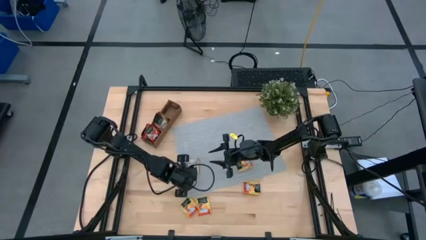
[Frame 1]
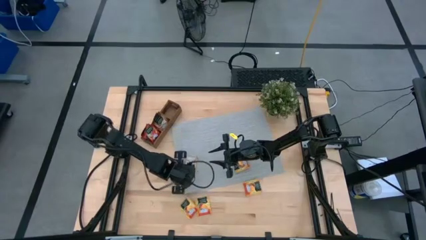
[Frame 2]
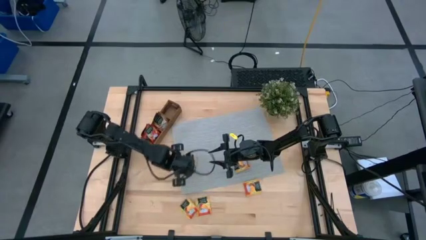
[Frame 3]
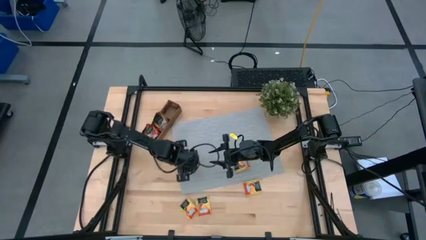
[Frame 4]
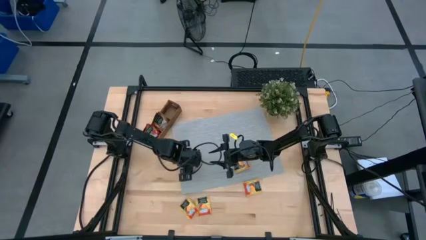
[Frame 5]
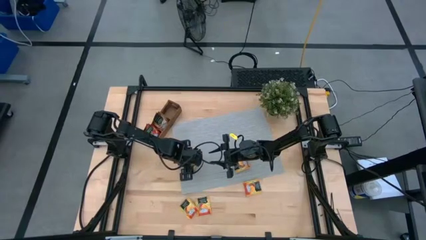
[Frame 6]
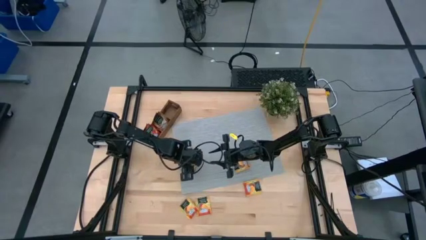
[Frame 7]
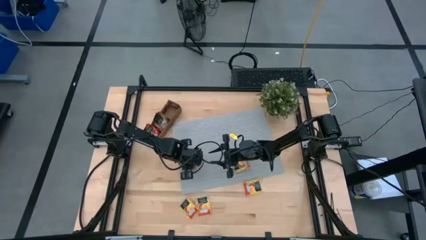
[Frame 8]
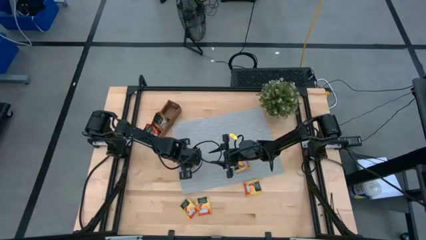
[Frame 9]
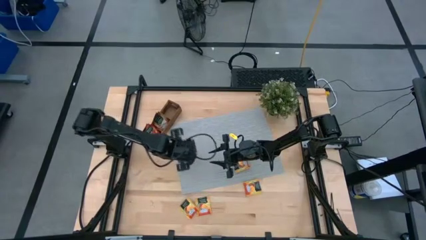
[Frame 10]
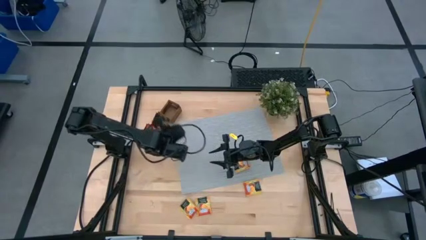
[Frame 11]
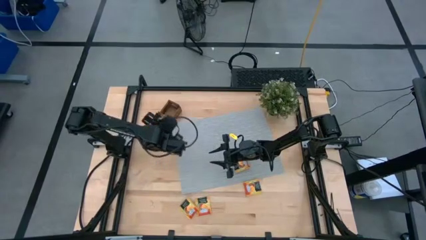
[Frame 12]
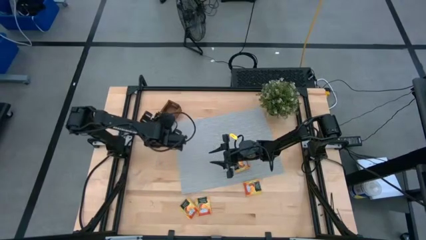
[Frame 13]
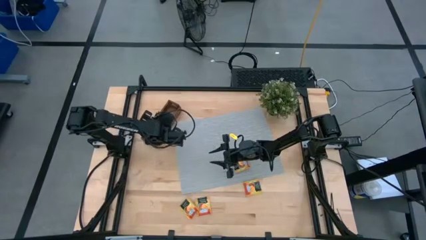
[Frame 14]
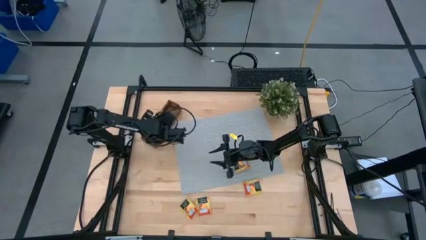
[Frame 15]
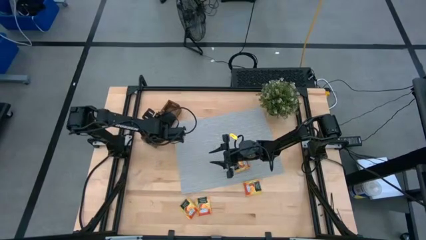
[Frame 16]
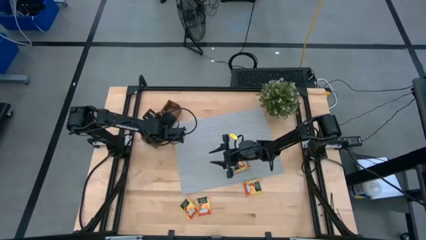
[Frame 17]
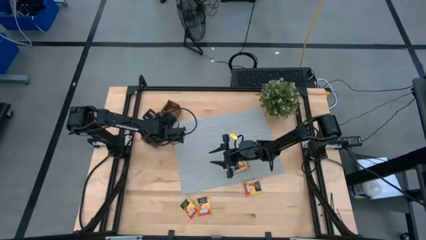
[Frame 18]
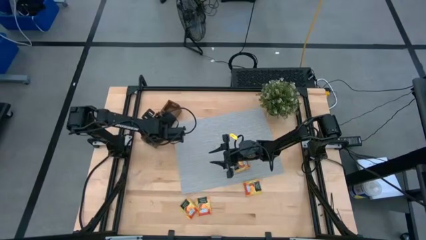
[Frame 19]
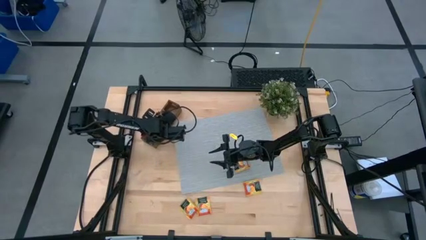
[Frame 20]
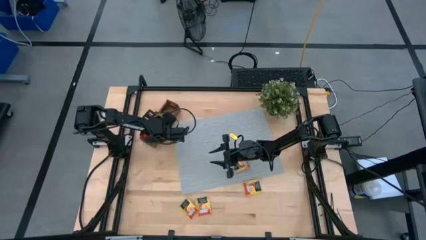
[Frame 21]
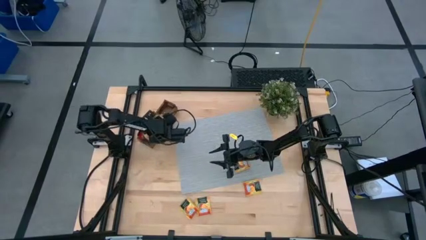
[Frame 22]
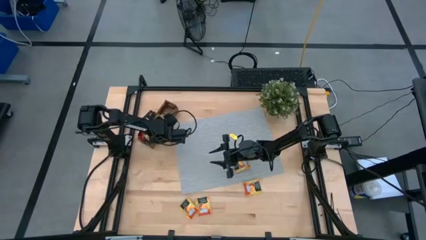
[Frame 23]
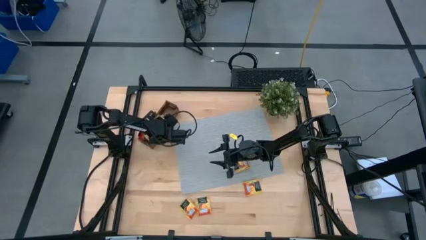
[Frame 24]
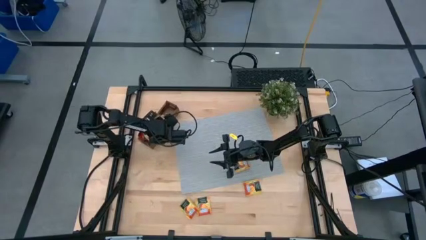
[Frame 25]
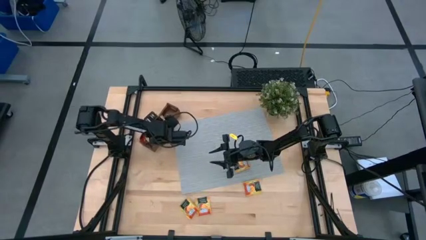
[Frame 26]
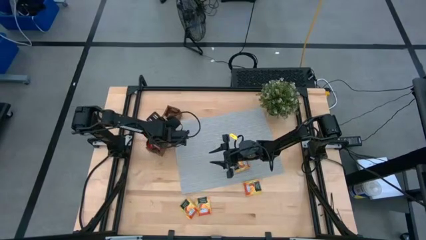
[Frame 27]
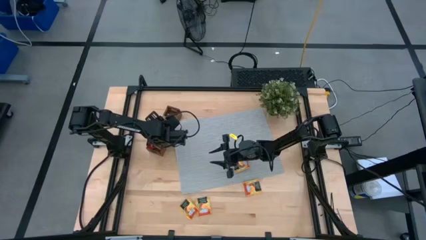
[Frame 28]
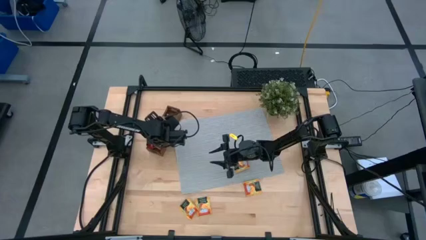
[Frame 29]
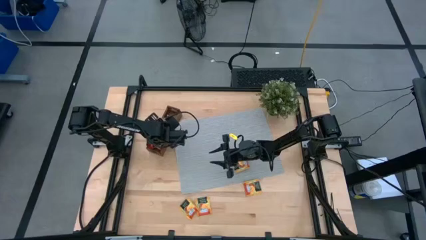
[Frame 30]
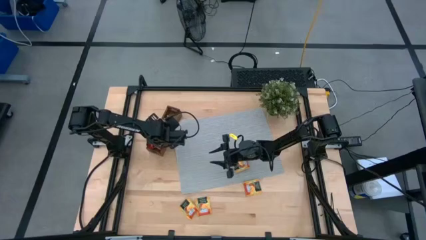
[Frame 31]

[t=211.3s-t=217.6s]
Task: Pick & Place Tea
Put the brown tea bag into the middle section of the wooden organizer

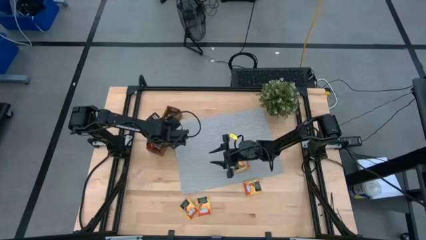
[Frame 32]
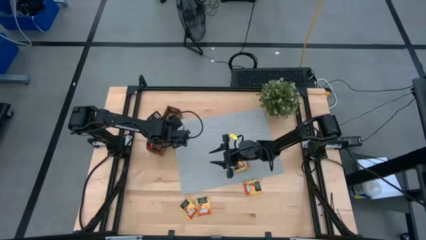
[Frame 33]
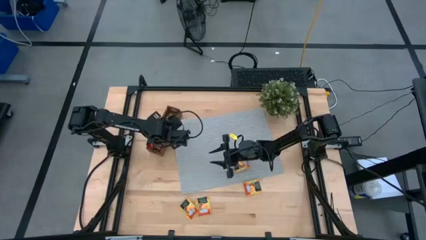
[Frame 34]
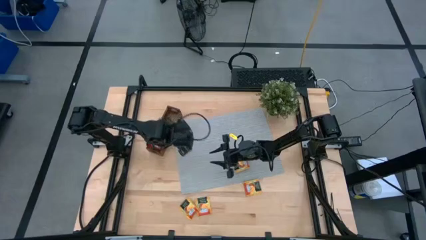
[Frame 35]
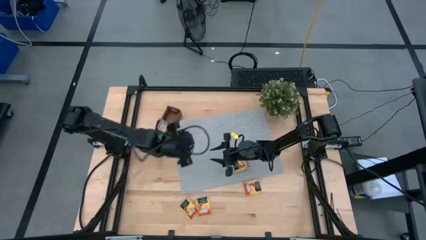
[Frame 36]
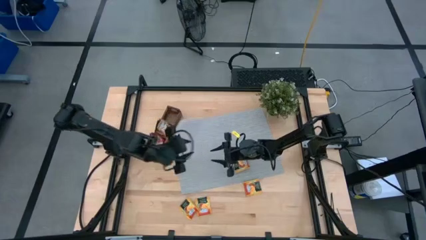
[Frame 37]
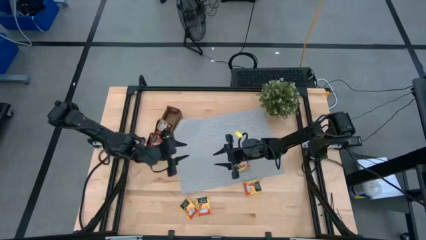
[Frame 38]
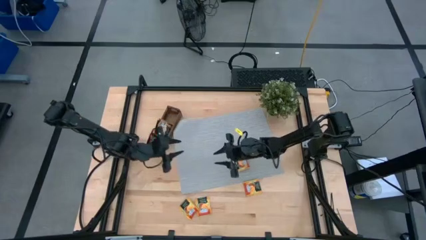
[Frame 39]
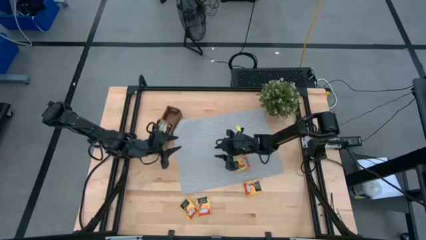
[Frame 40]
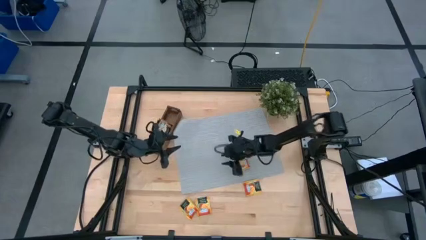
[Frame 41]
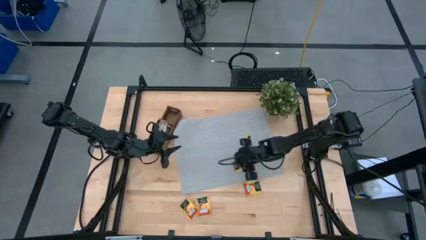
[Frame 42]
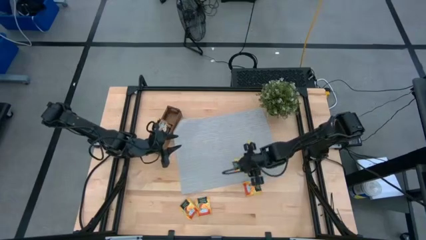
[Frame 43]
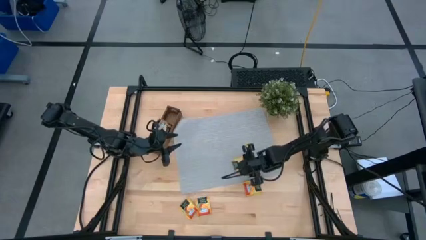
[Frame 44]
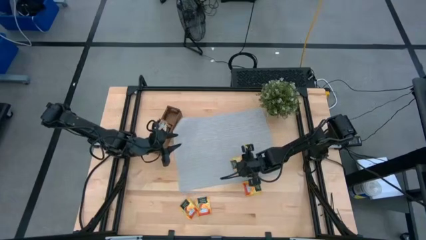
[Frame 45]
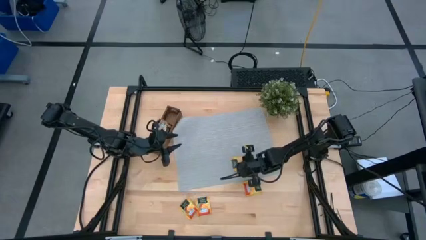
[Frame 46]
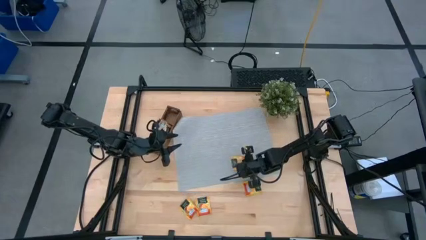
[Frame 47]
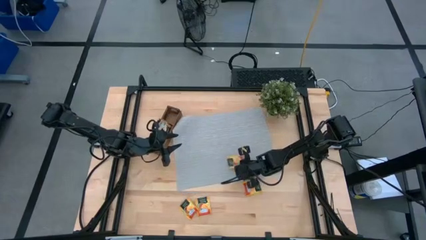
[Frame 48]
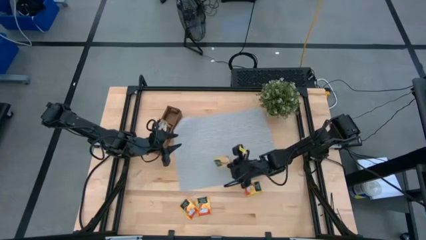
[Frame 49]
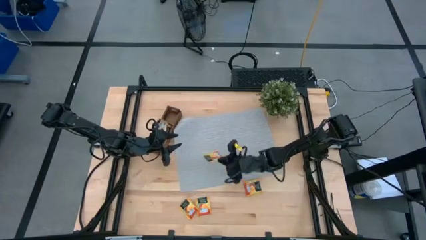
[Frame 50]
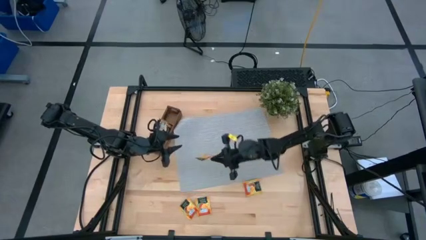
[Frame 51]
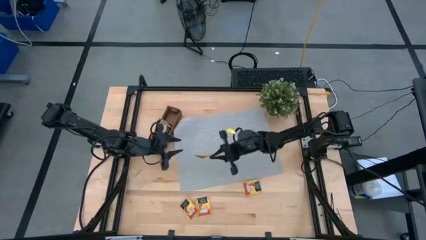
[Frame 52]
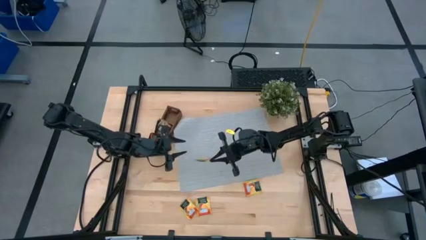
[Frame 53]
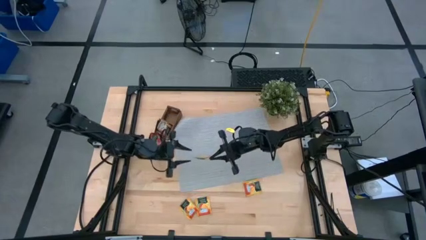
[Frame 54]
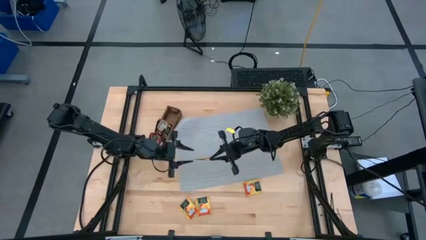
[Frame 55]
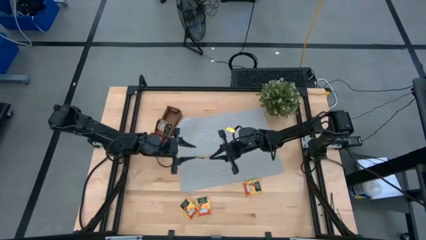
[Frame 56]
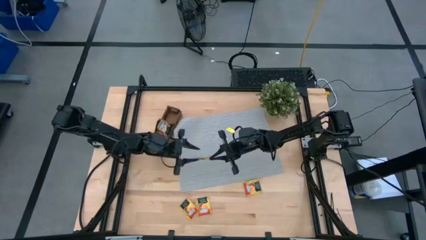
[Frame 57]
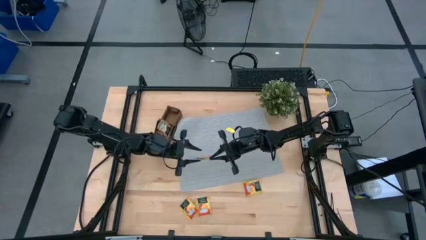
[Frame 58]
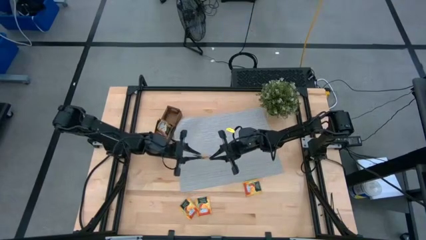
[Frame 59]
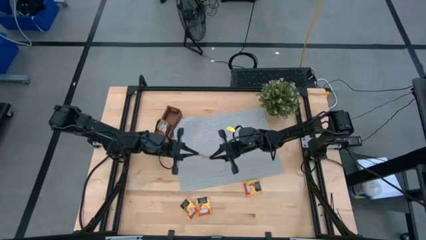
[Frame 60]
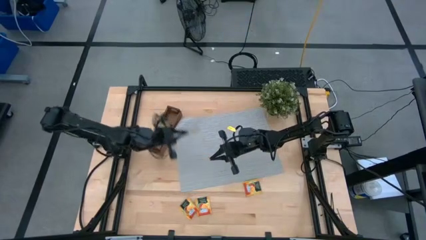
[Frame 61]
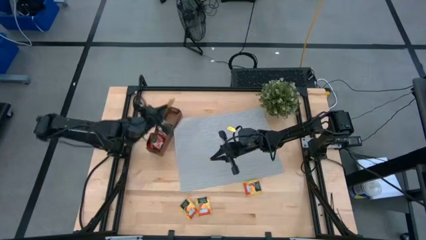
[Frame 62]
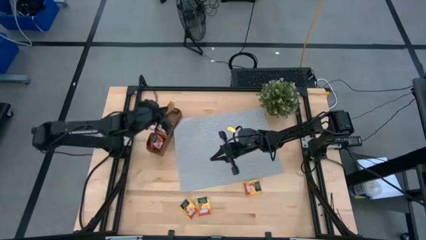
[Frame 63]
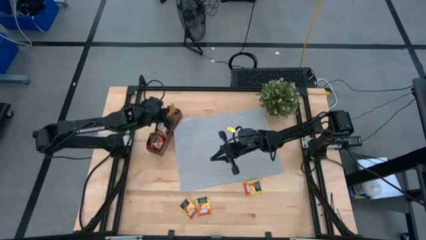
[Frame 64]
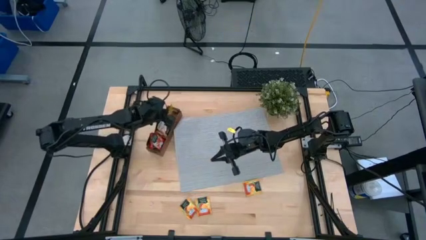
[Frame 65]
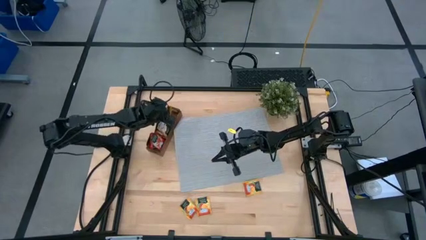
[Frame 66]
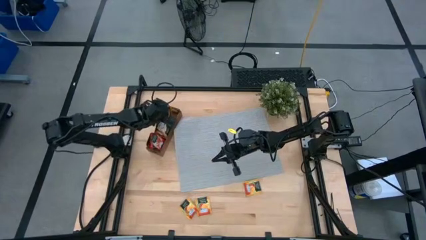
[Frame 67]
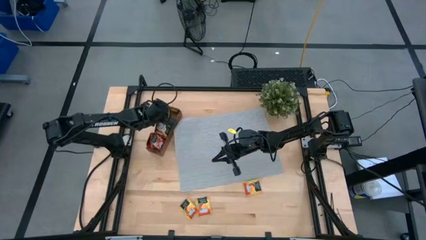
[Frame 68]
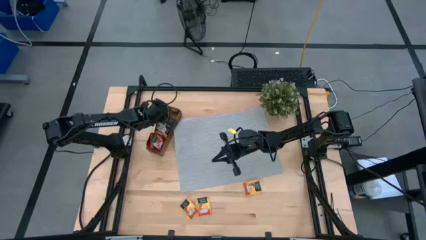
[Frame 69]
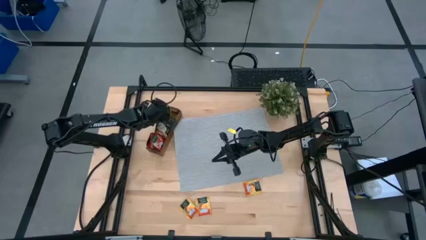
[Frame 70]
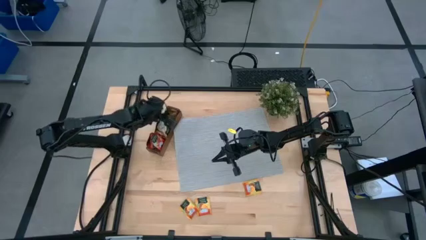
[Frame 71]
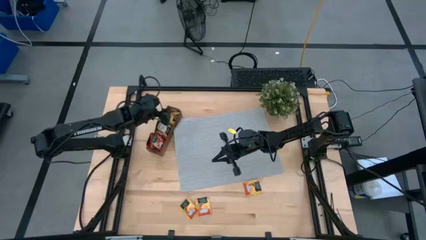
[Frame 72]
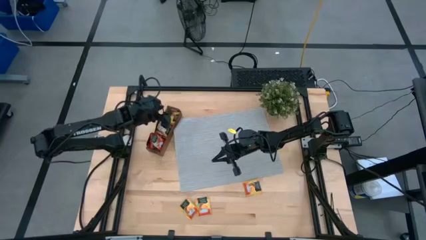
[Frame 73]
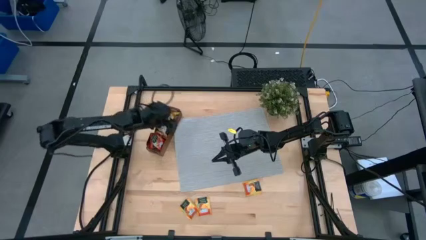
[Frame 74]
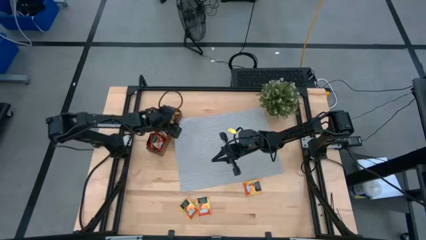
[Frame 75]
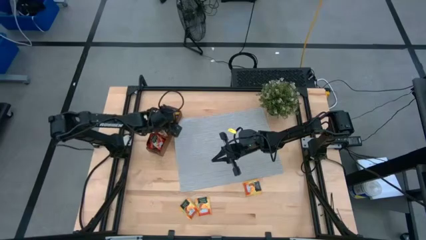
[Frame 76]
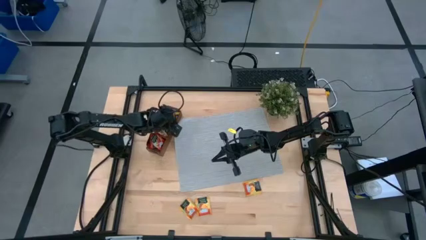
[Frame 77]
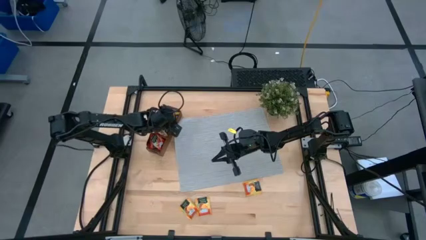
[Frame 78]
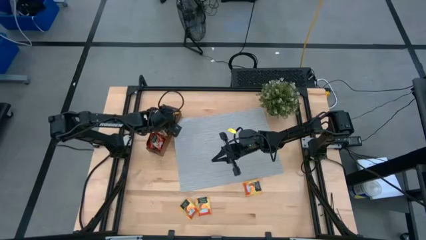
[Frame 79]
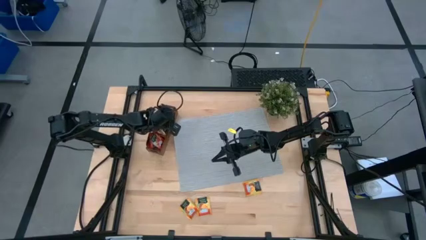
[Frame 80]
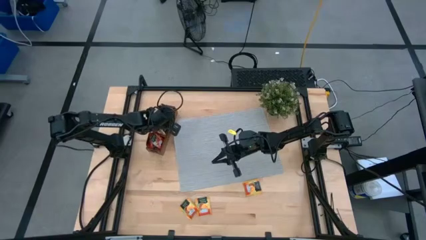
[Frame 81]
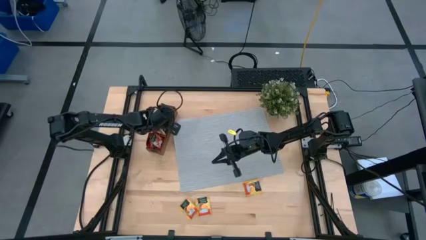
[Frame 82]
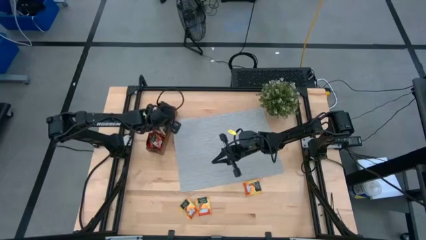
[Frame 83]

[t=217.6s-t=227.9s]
Put the yellow tea bag into the right section of the wooden organizer
